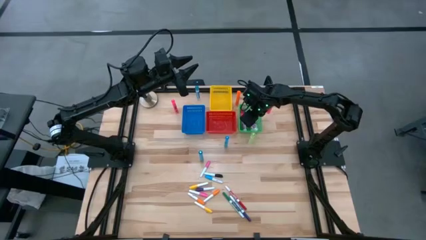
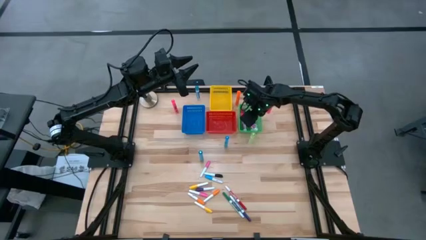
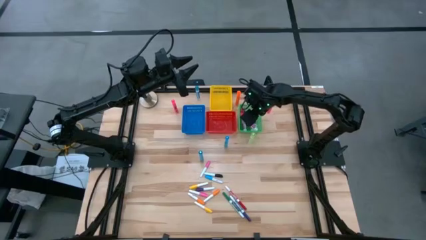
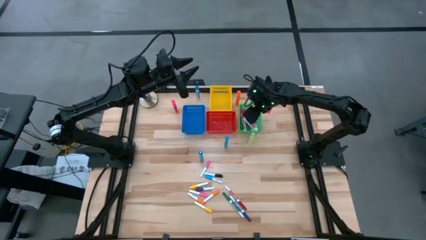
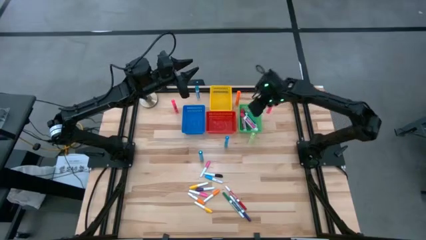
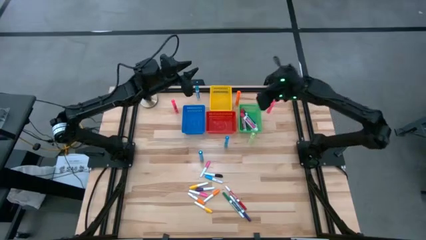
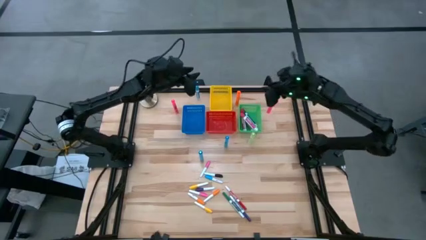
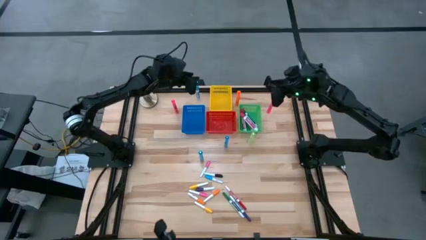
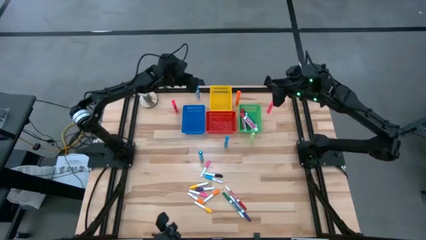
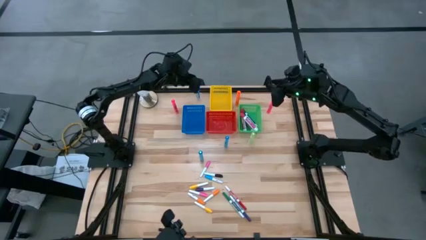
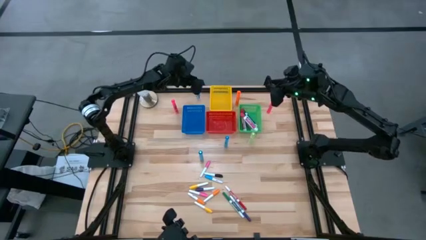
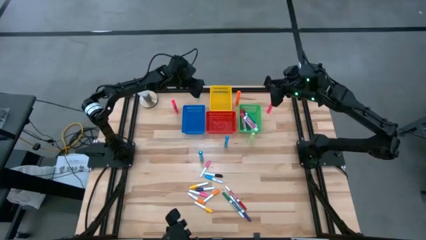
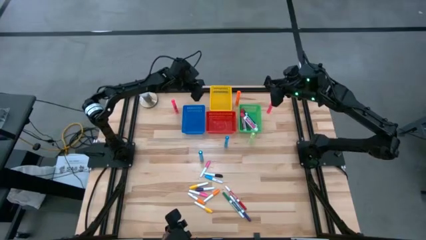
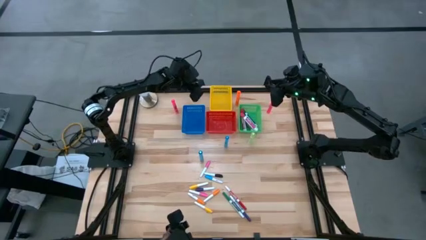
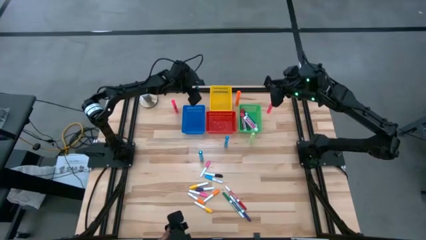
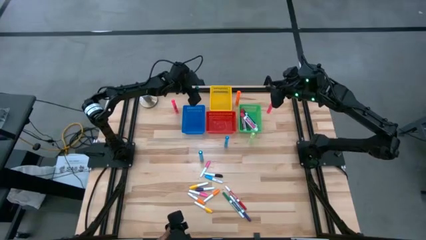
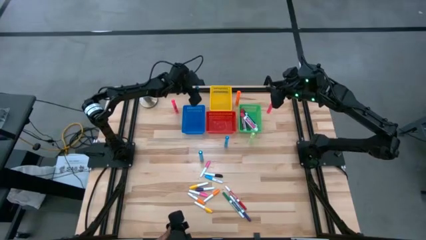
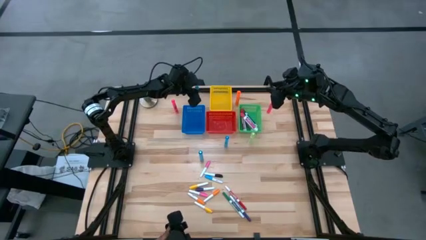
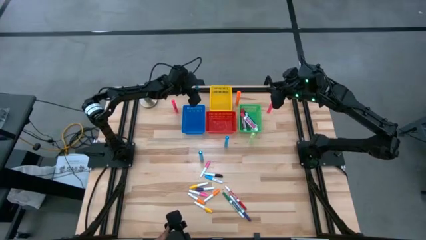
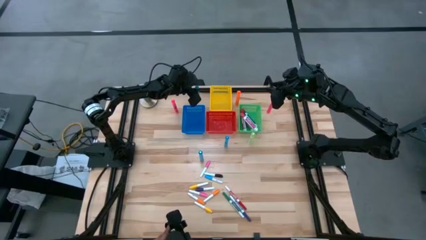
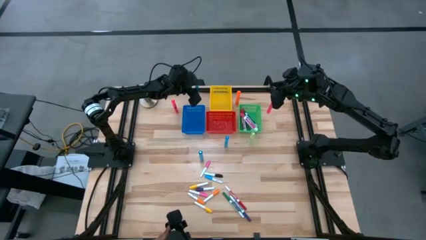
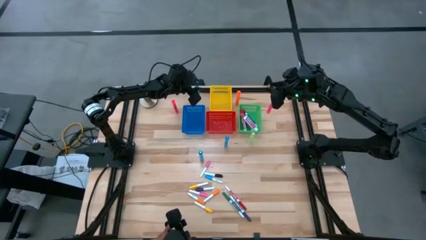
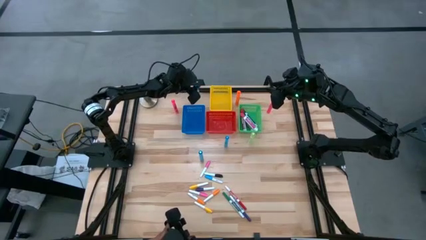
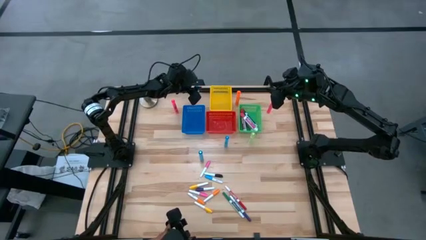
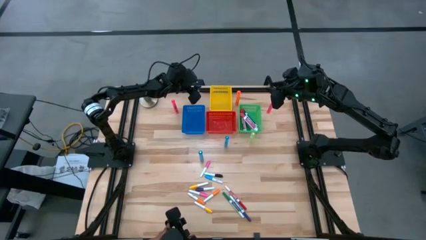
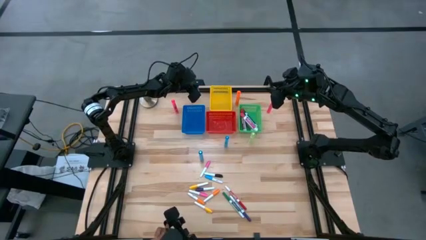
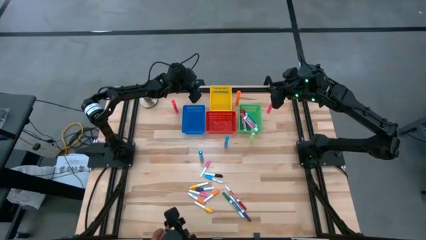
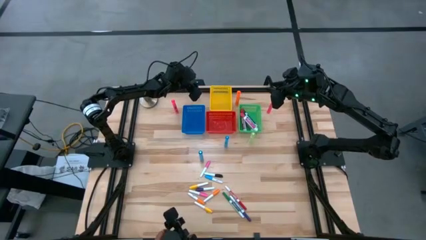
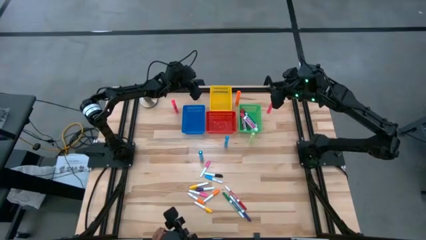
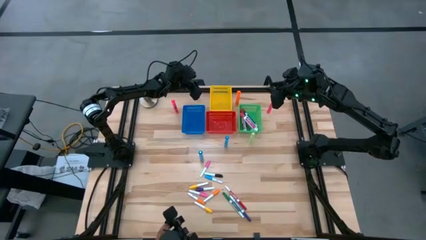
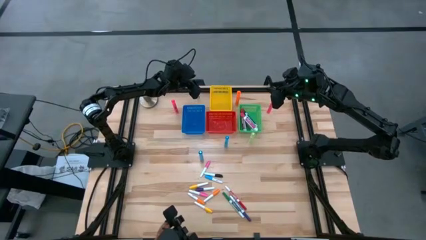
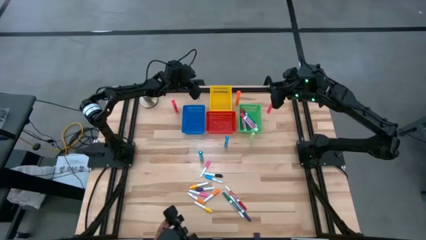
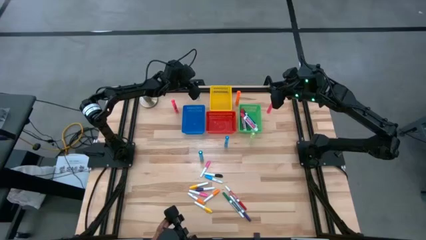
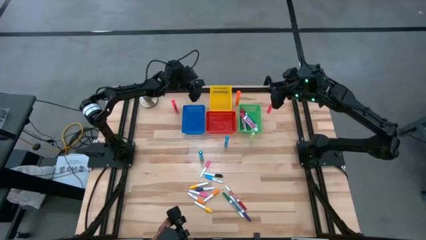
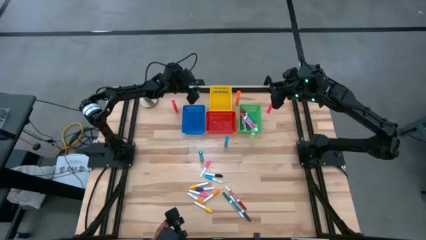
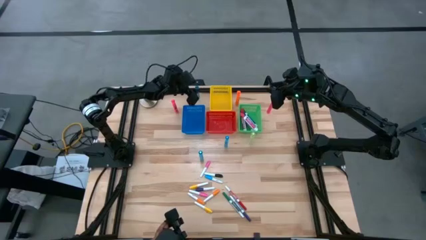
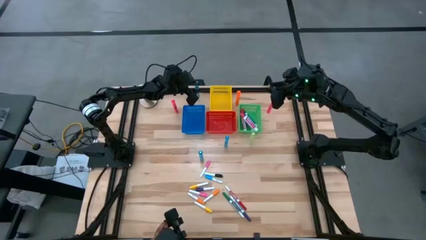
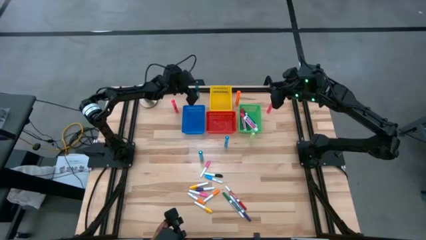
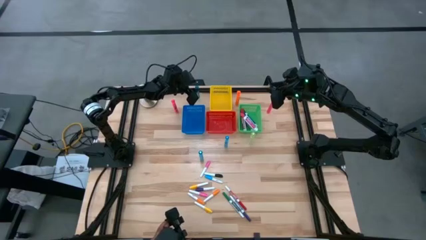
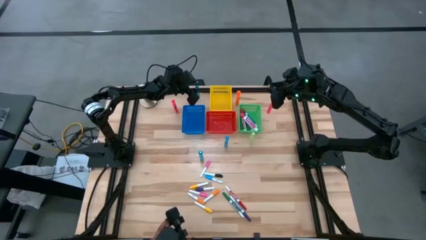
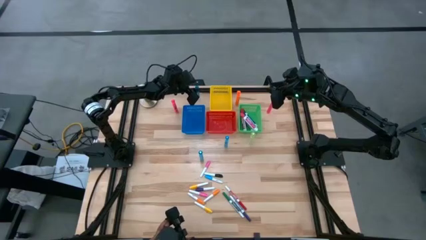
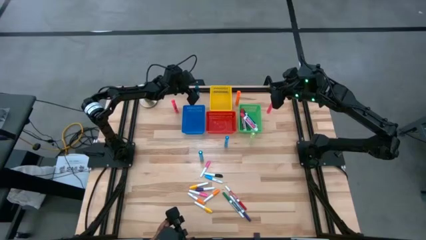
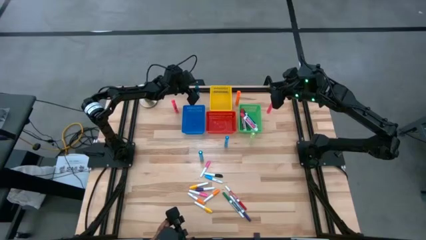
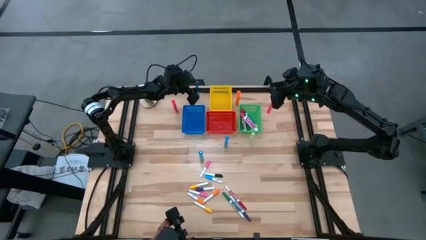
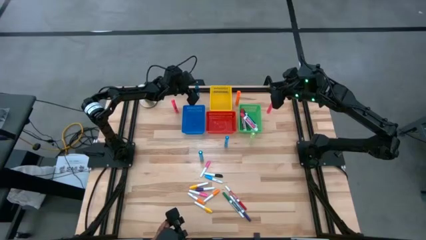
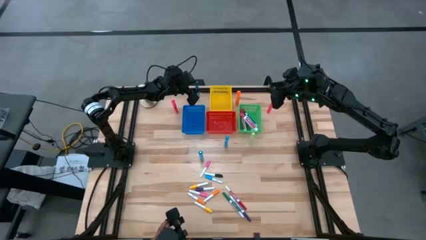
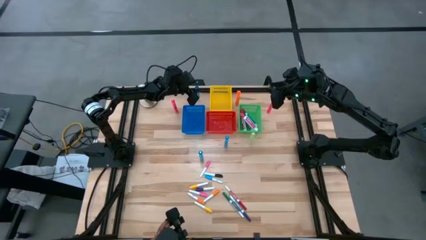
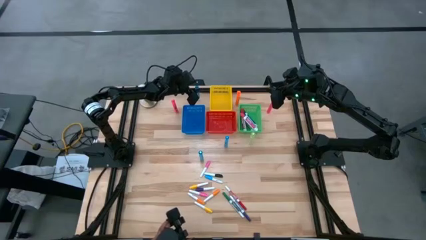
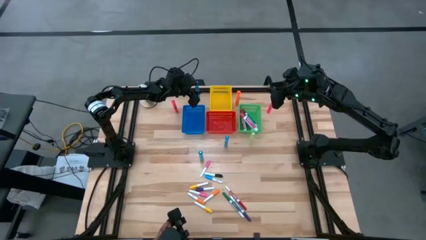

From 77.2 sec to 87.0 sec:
Task: Pick & Place Markers
Put the large light blue marker pen into the green bin

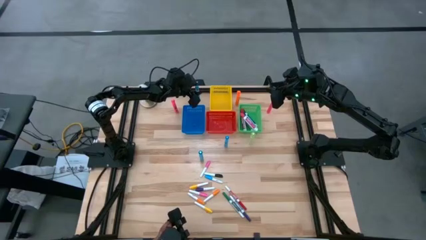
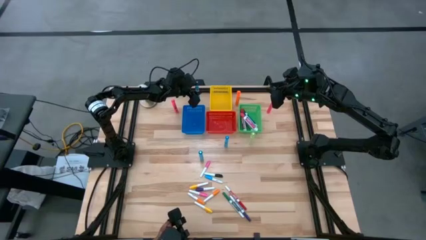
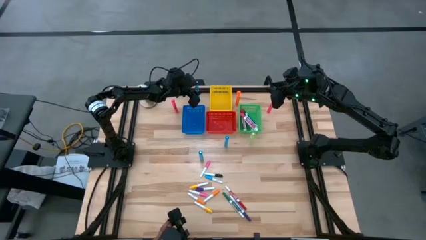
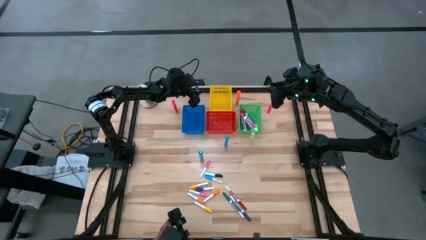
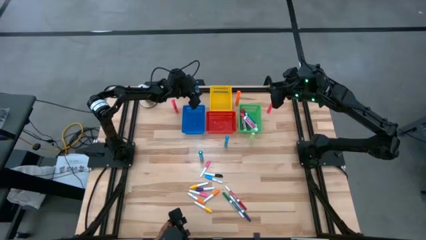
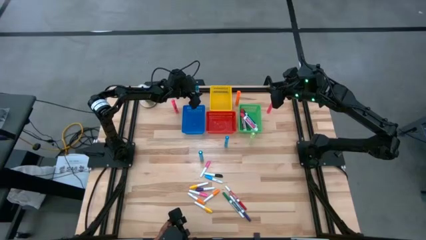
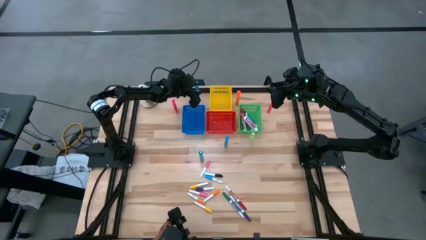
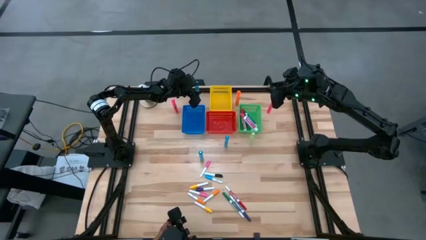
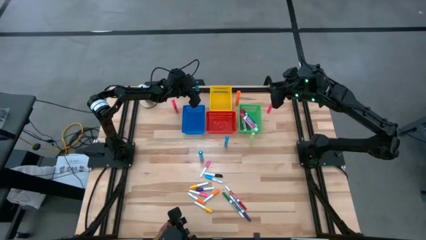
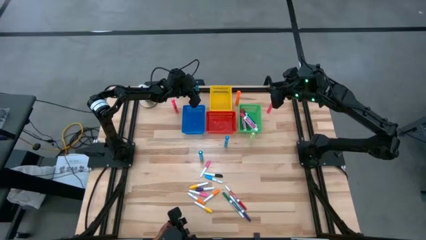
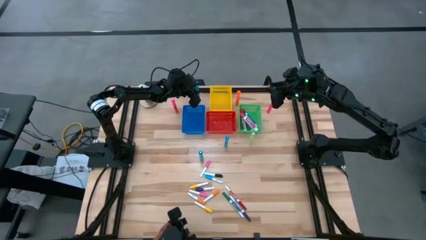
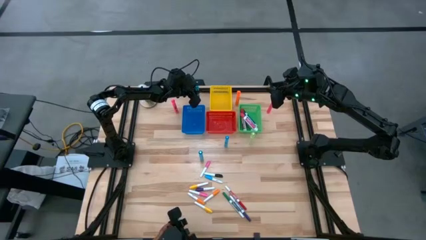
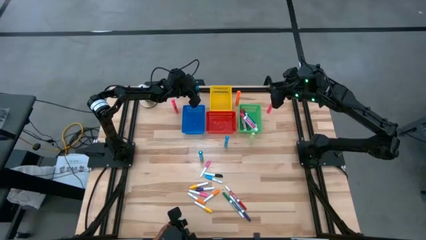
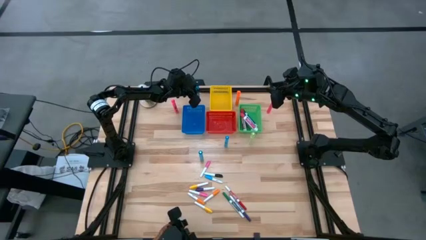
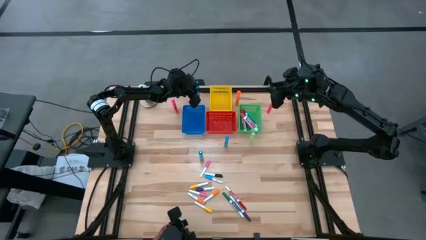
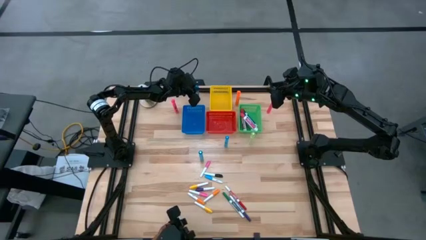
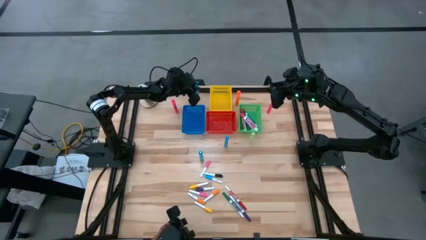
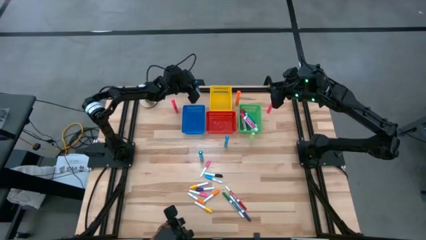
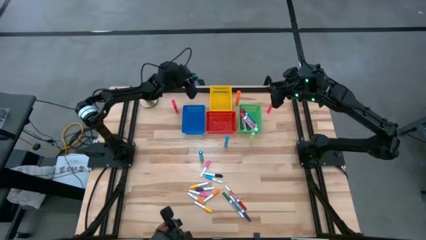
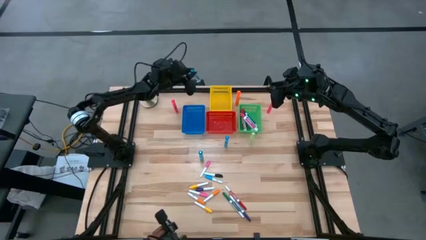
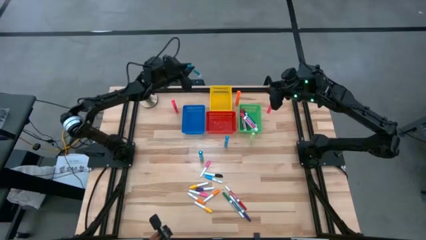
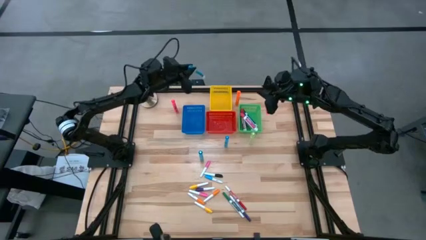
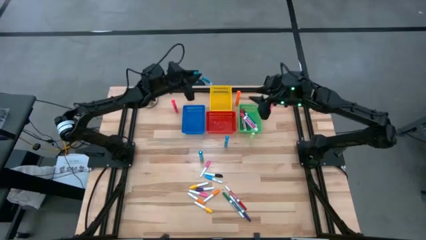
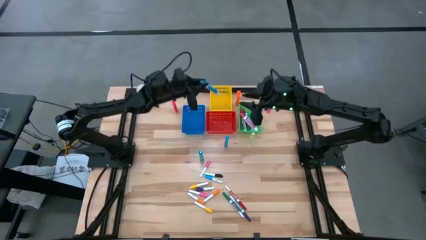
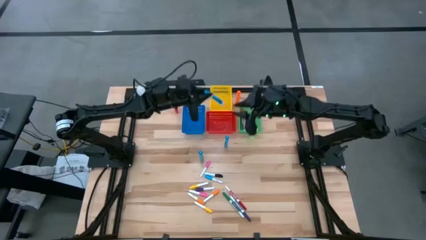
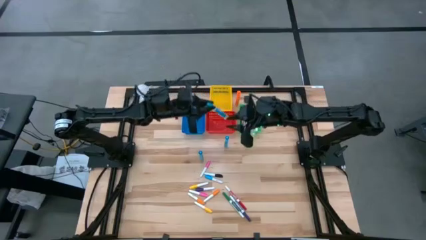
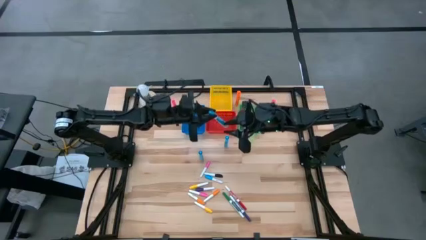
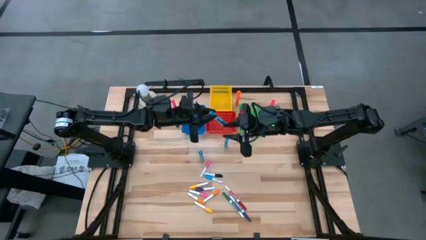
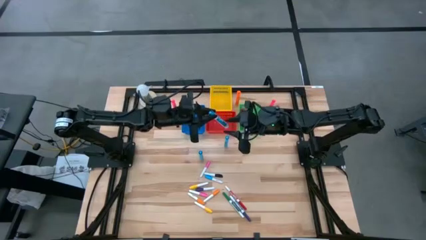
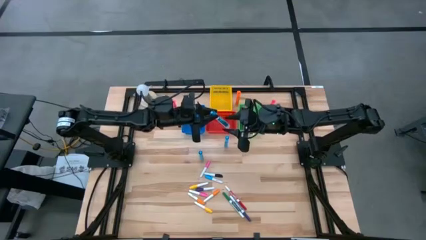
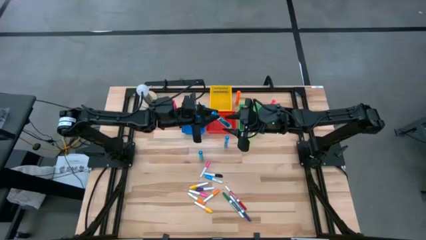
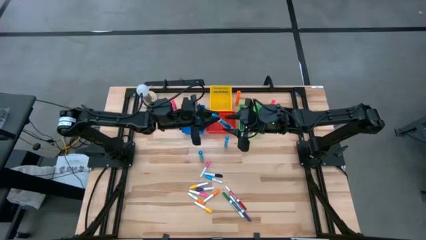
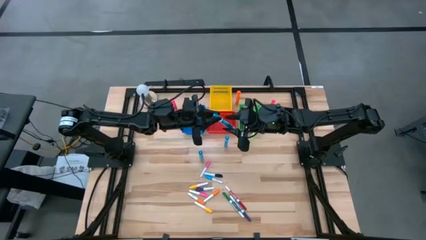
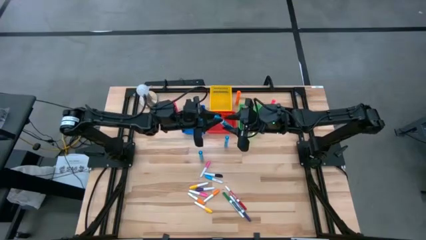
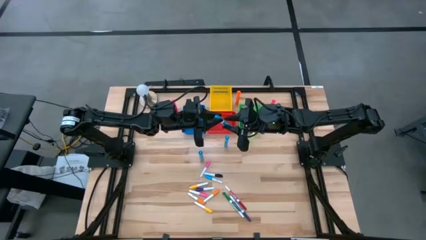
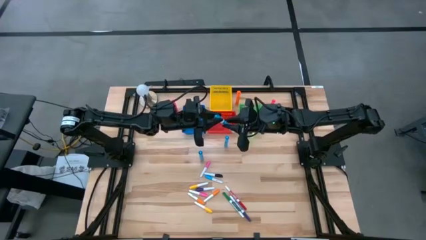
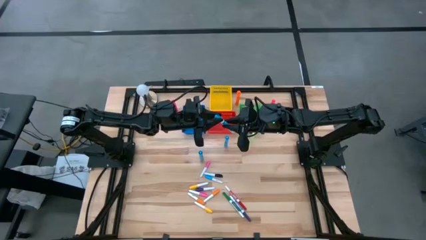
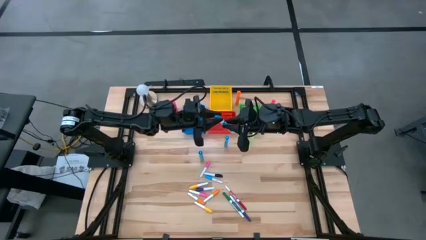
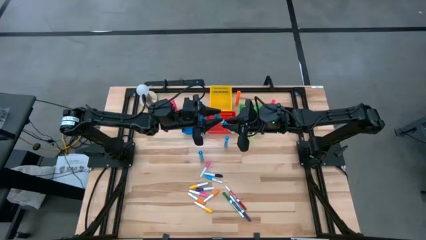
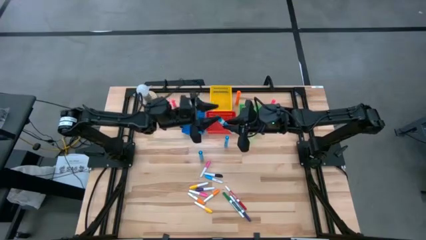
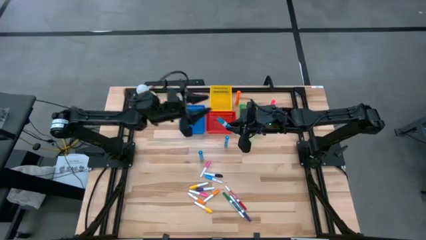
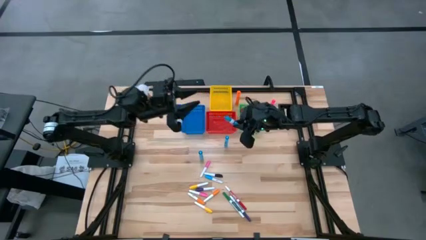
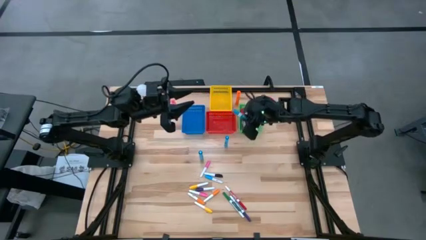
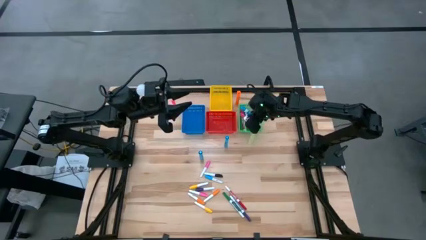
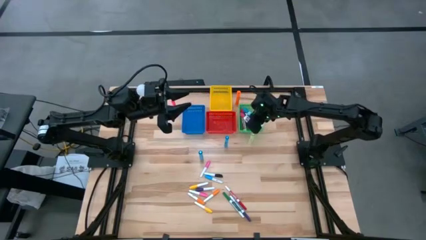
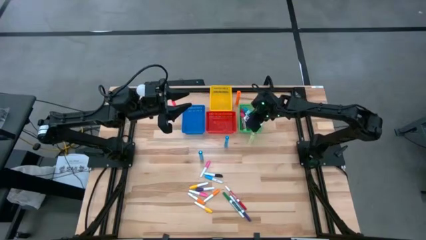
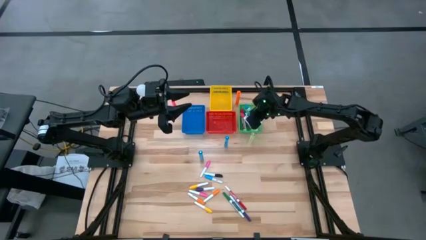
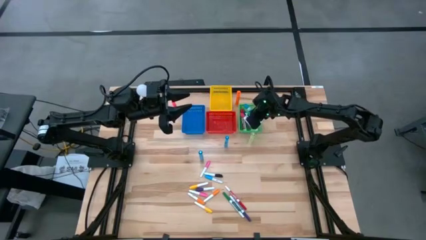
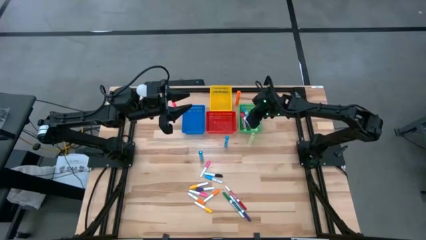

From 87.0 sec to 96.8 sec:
Put the large light blue marker pen into the green bin
